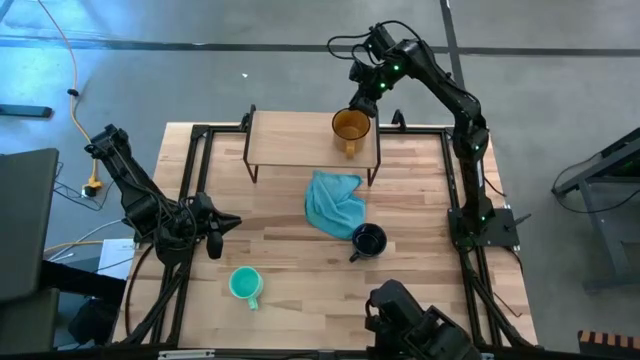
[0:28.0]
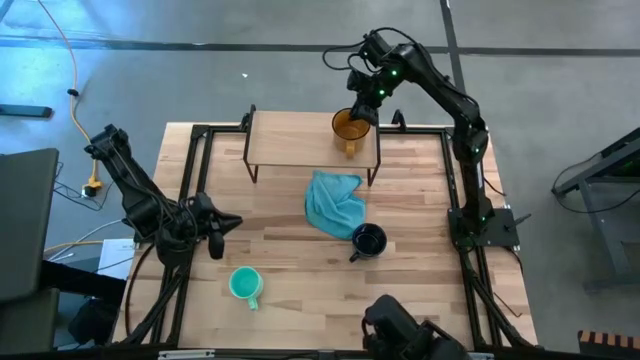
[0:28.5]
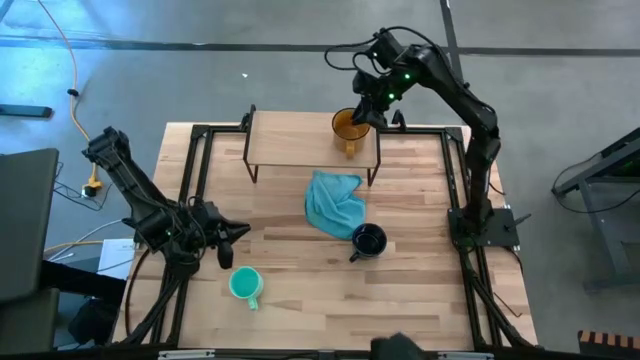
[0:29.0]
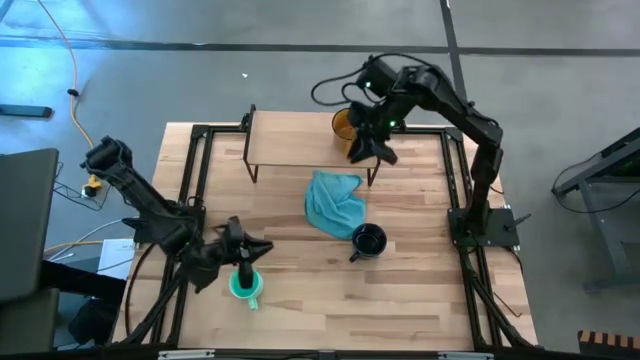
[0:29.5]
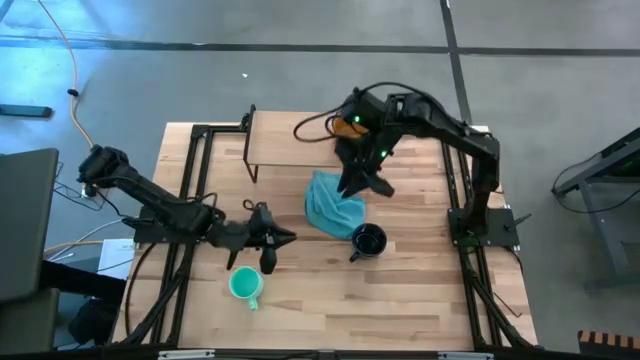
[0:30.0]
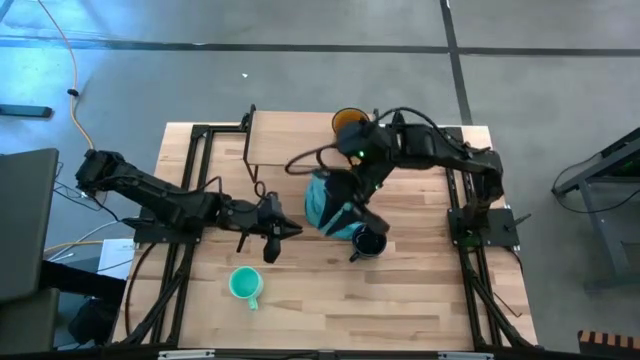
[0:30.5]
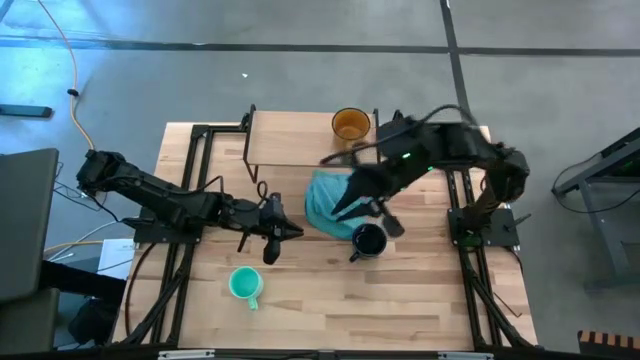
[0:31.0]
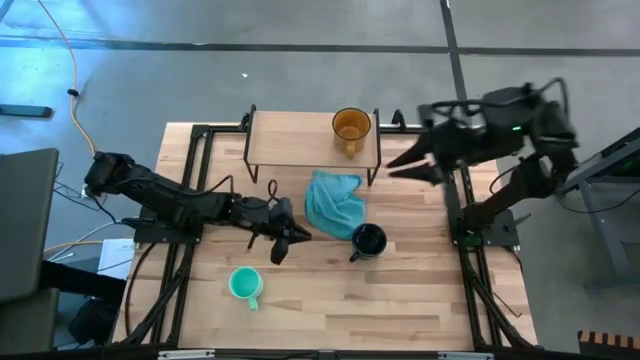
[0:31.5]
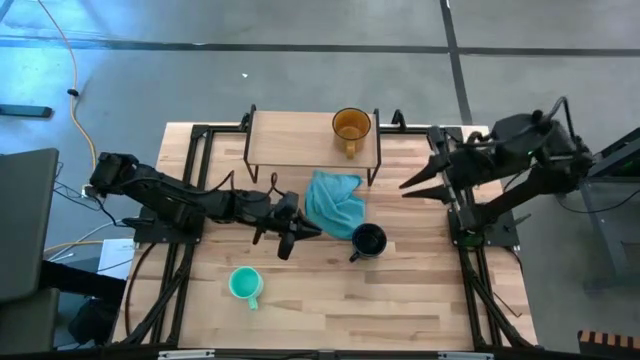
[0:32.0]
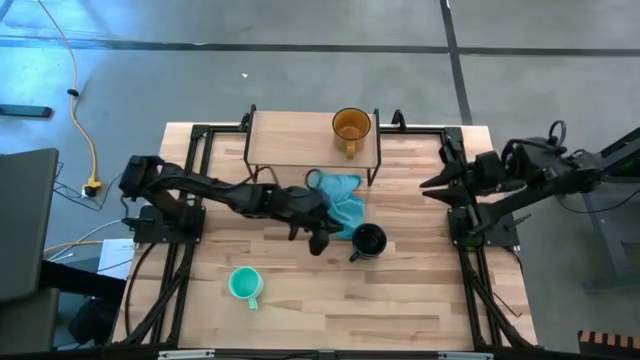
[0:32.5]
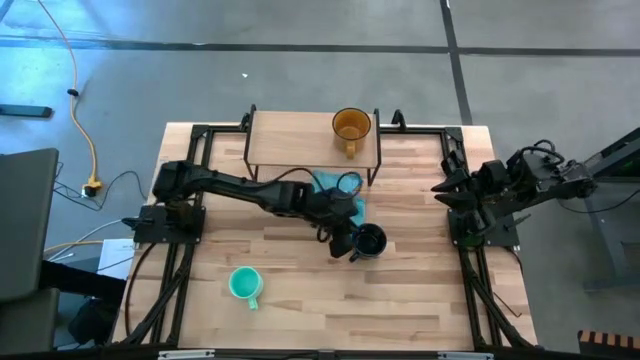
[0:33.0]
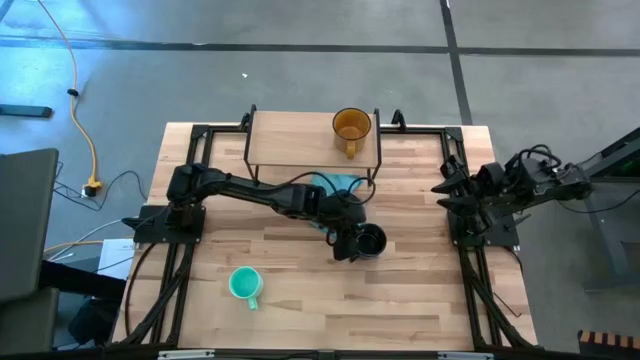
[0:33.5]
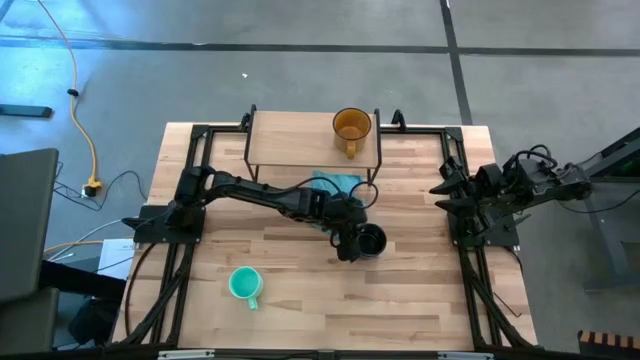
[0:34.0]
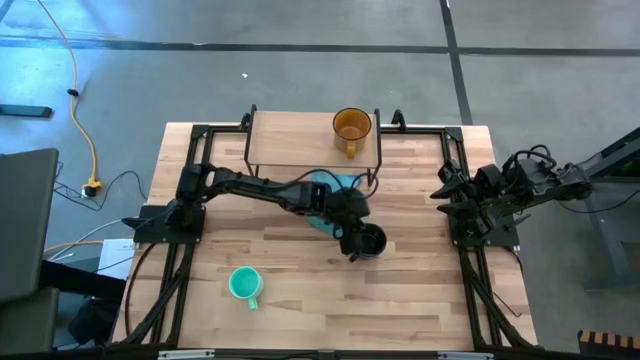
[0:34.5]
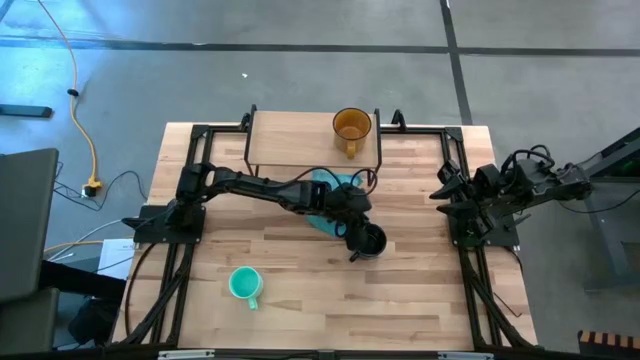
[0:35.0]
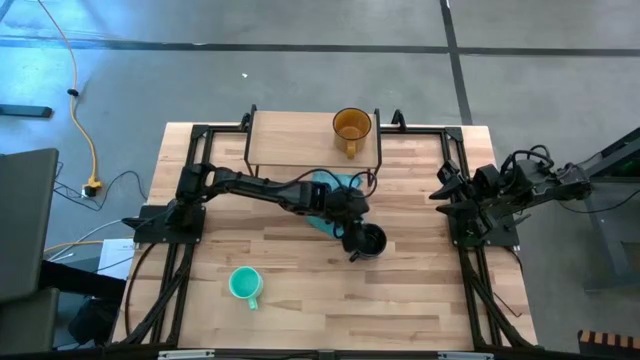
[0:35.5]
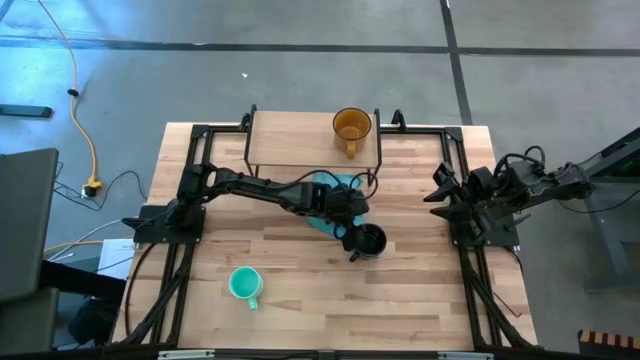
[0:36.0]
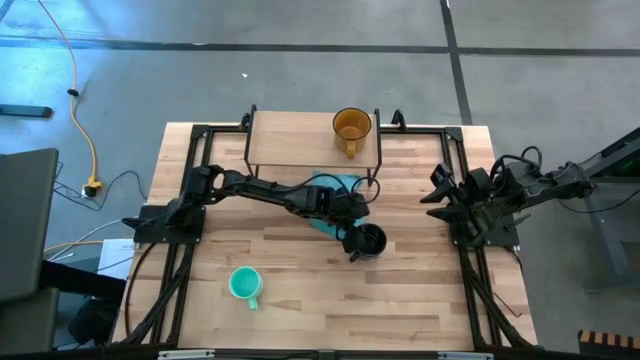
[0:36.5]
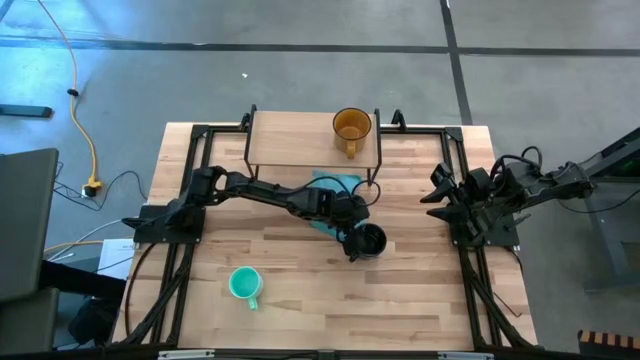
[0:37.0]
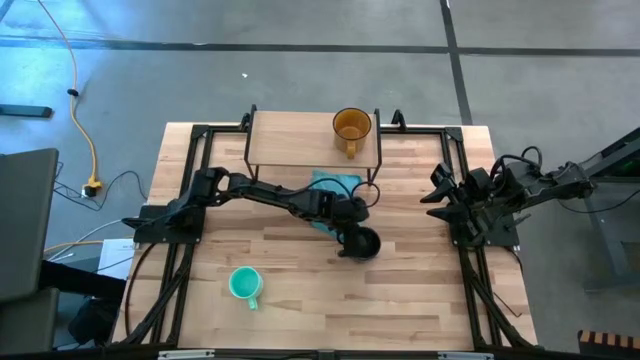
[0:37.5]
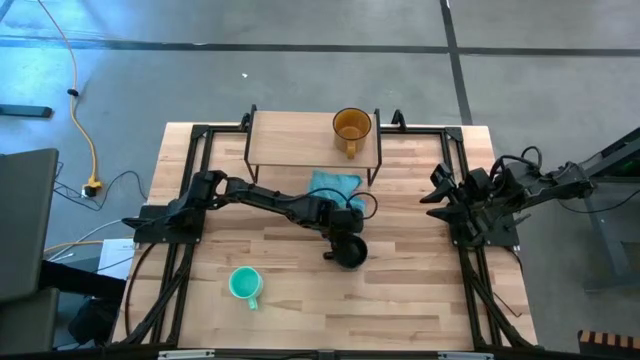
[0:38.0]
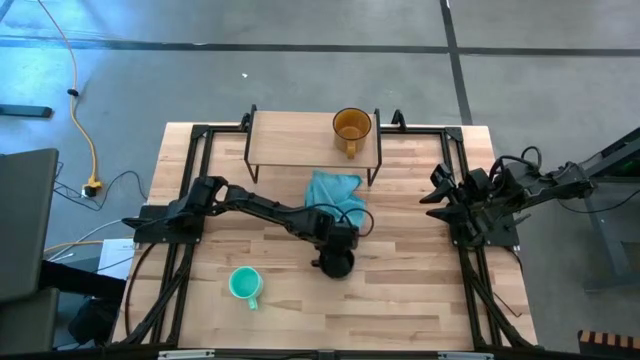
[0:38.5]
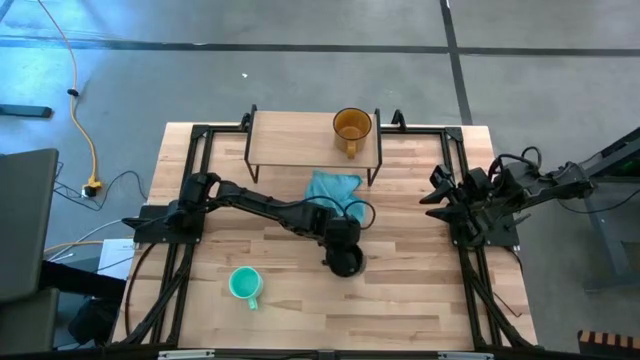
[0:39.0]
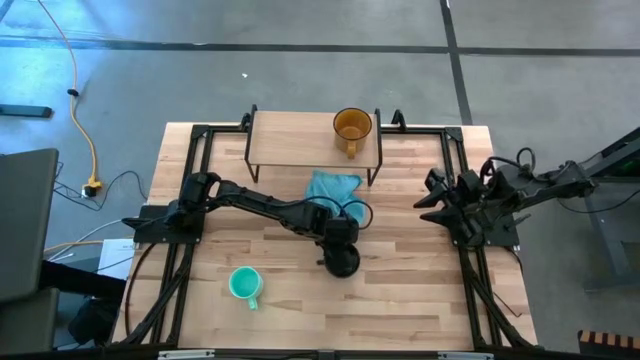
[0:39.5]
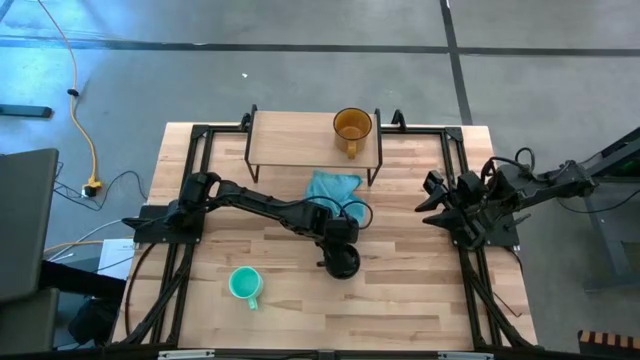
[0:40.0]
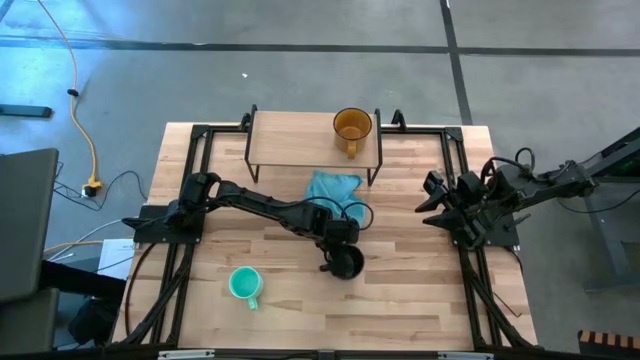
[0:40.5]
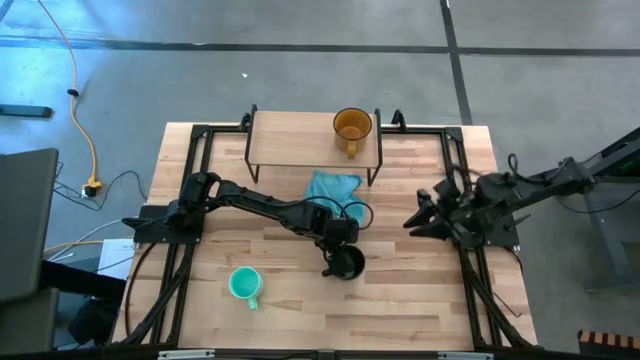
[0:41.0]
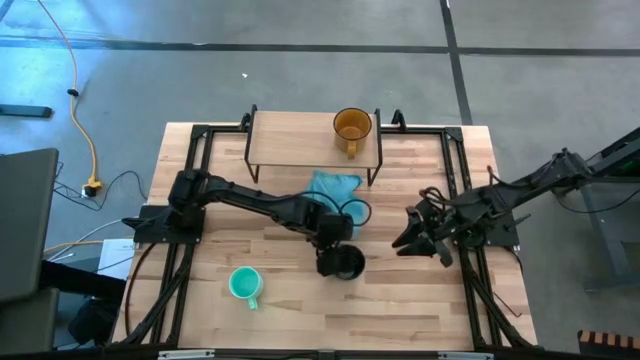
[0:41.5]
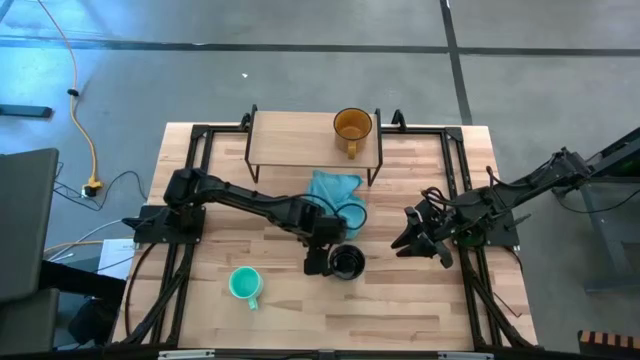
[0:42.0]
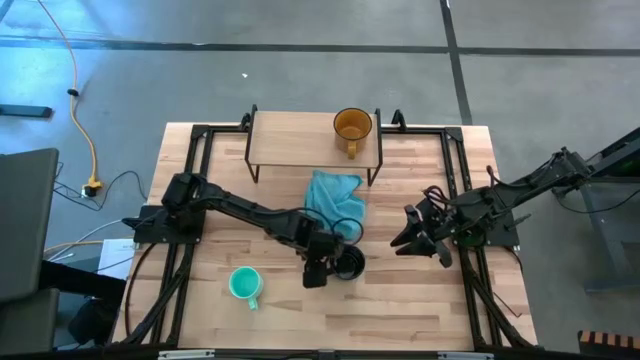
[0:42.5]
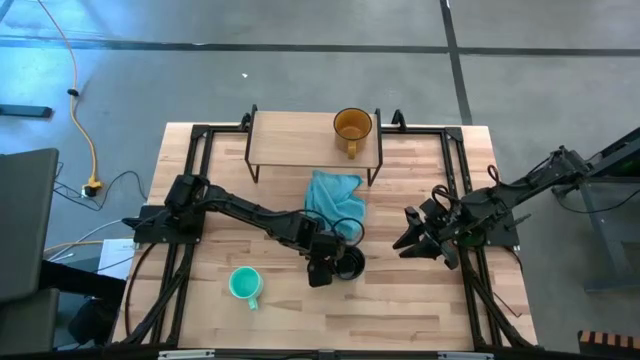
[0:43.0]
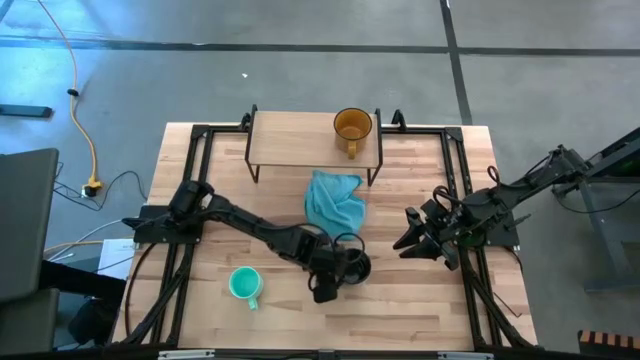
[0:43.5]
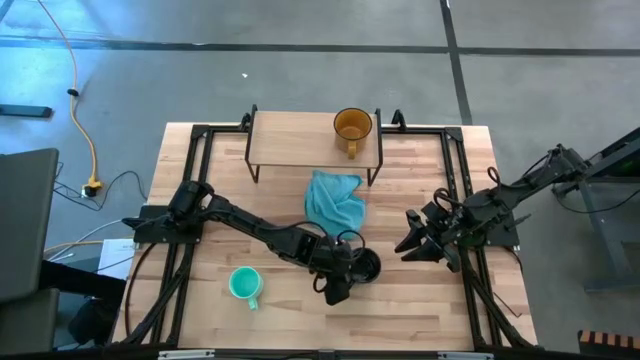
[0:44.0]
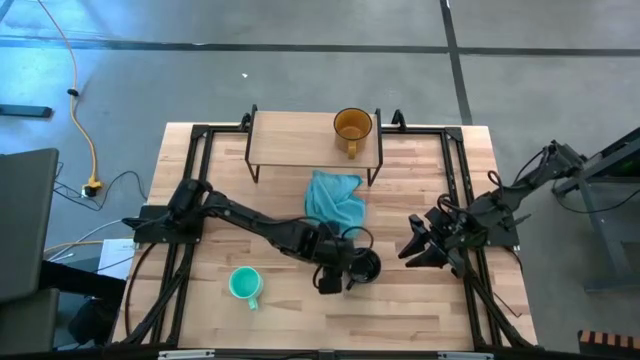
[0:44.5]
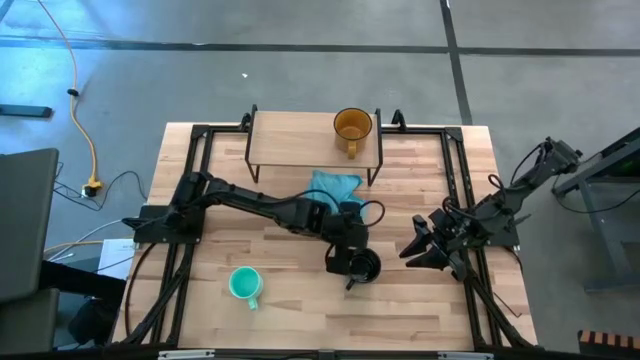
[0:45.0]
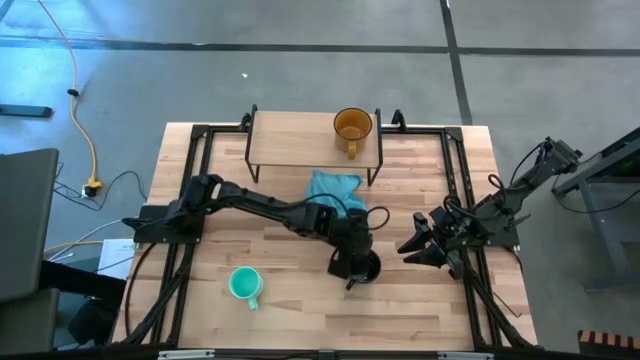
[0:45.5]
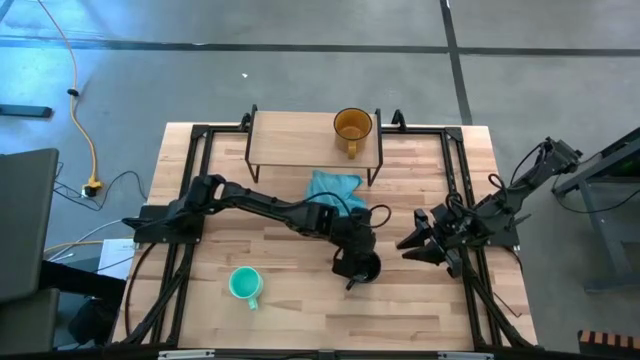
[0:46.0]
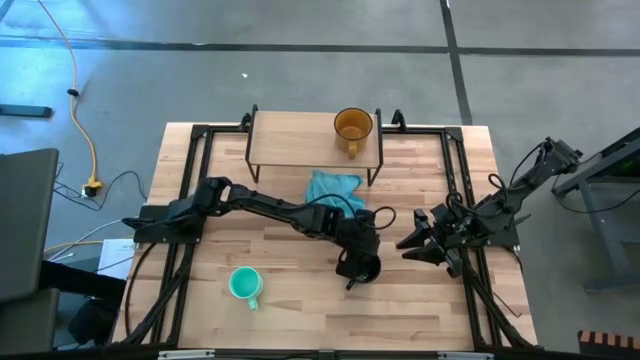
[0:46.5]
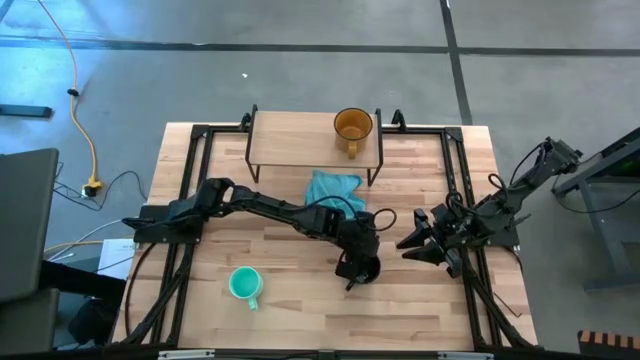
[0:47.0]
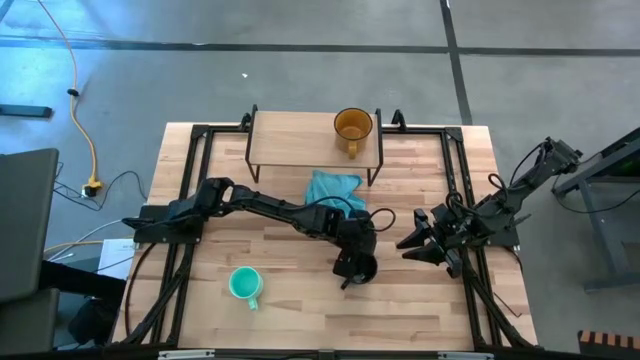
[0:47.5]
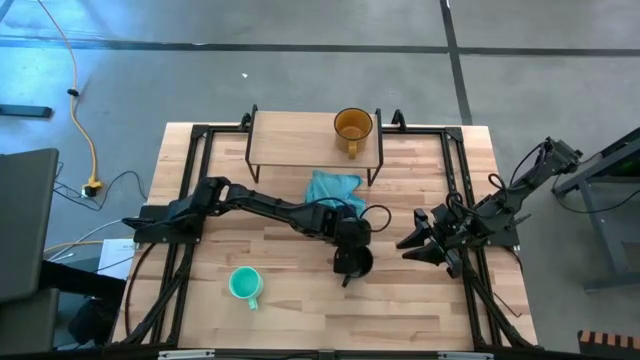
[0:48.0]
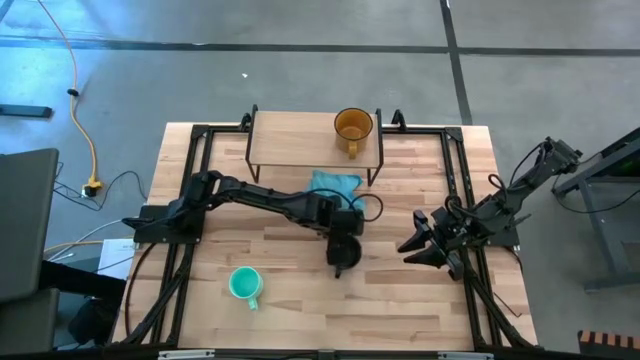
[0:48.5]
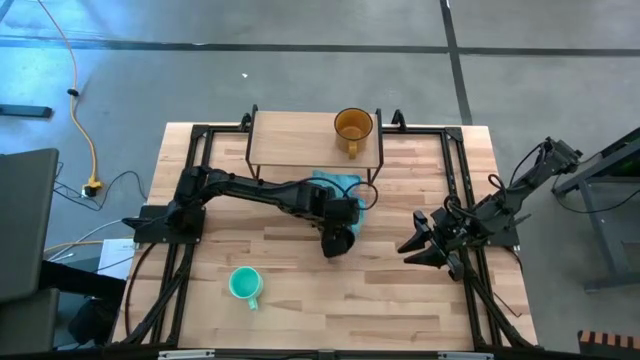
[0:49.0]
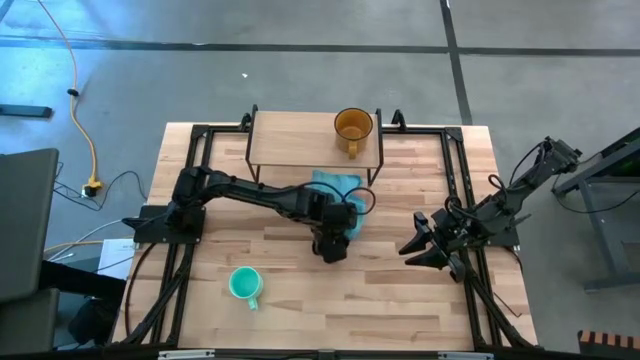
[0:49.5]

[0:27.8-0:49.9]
Task: Stack small to large cups/mugs on shelf
Put the dark blue mug on the shelf
